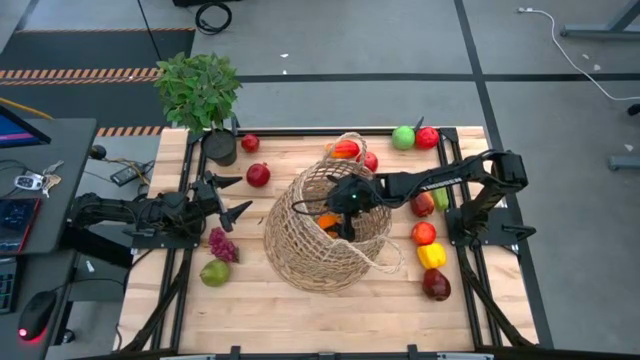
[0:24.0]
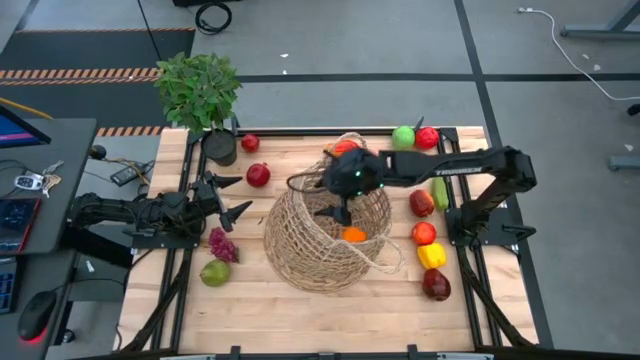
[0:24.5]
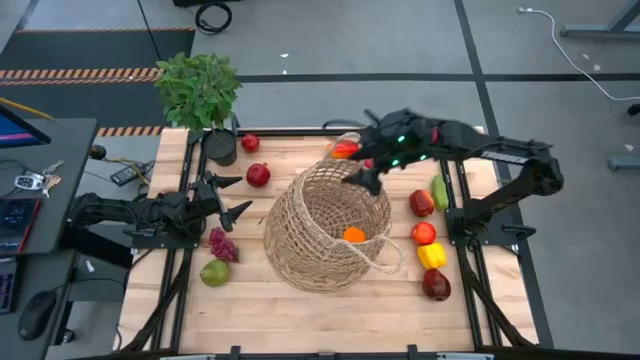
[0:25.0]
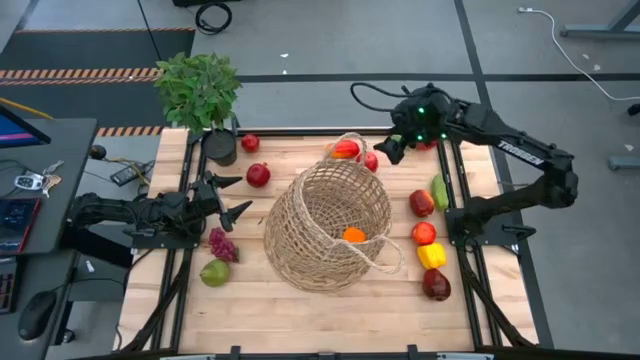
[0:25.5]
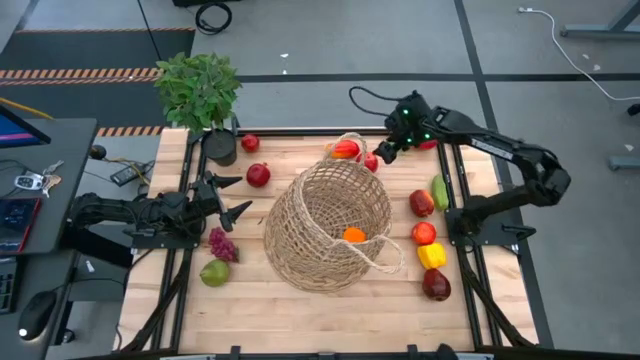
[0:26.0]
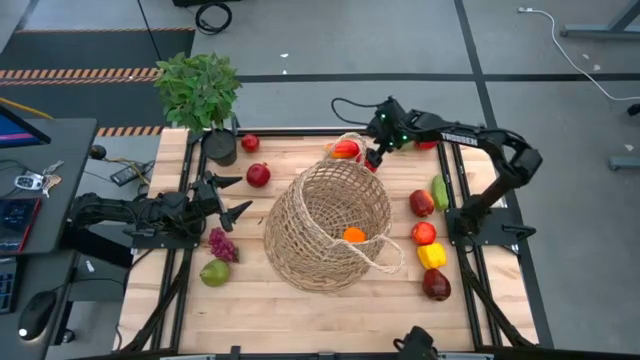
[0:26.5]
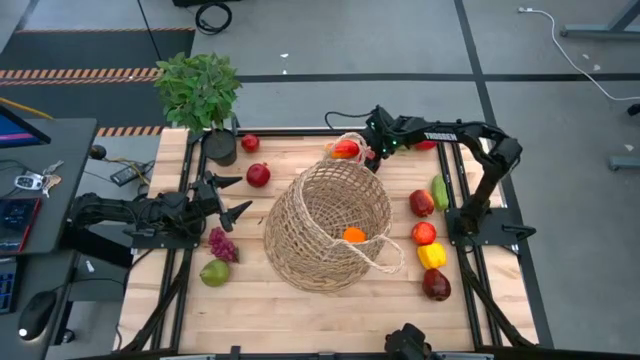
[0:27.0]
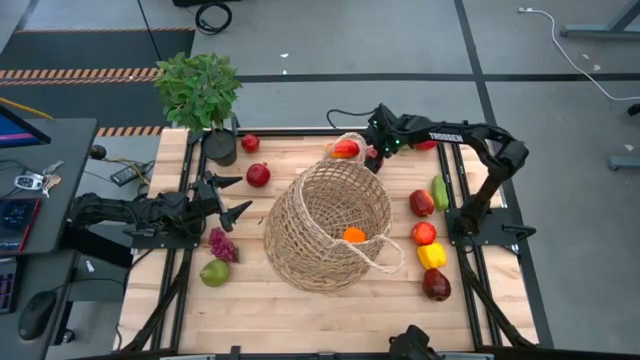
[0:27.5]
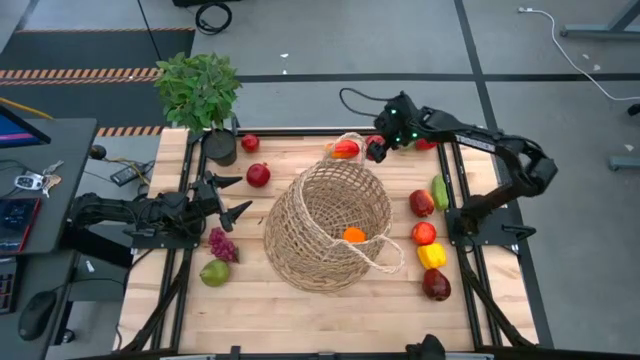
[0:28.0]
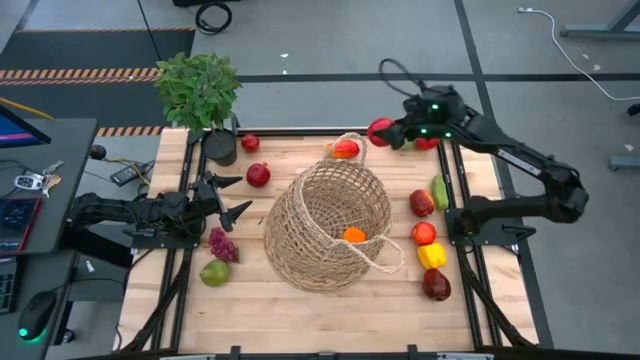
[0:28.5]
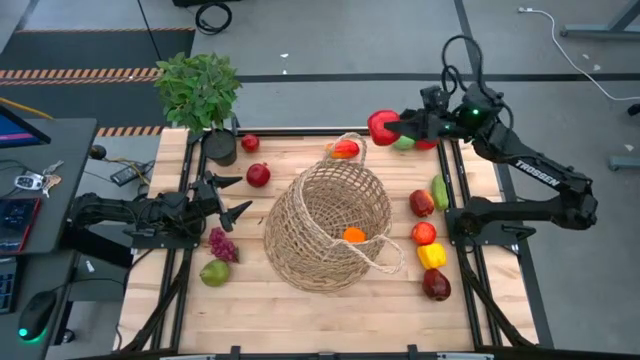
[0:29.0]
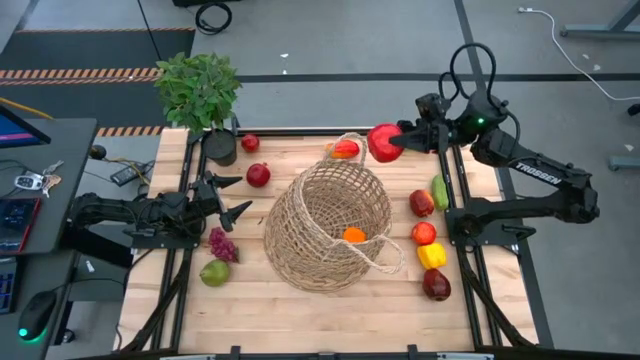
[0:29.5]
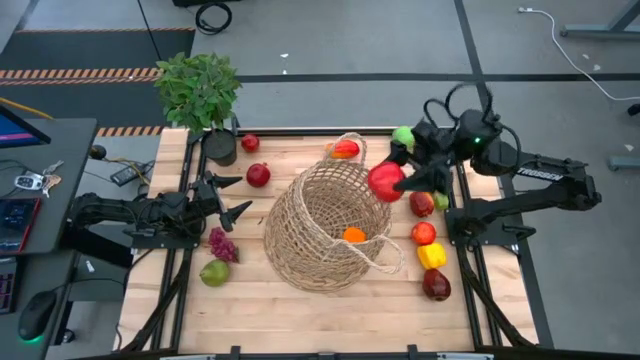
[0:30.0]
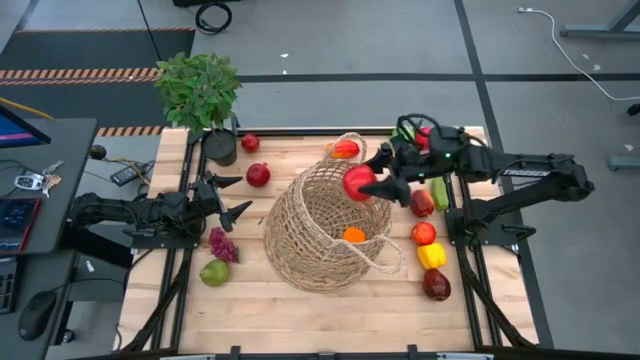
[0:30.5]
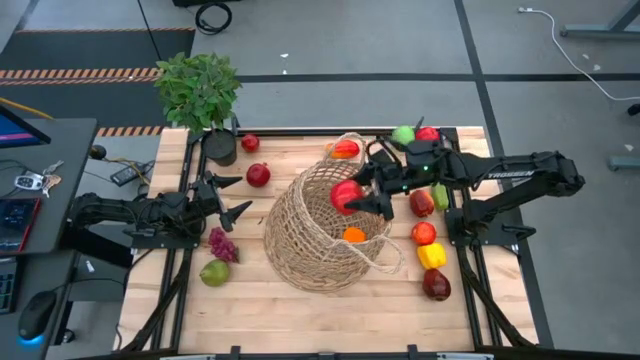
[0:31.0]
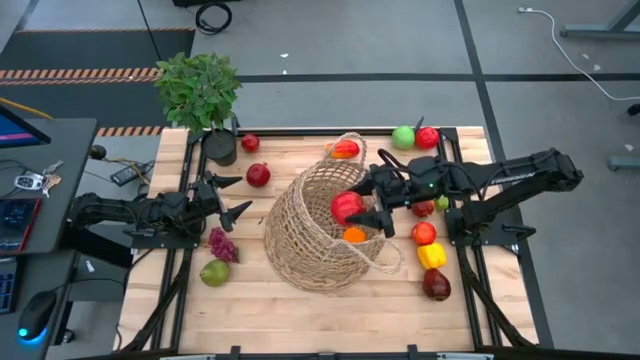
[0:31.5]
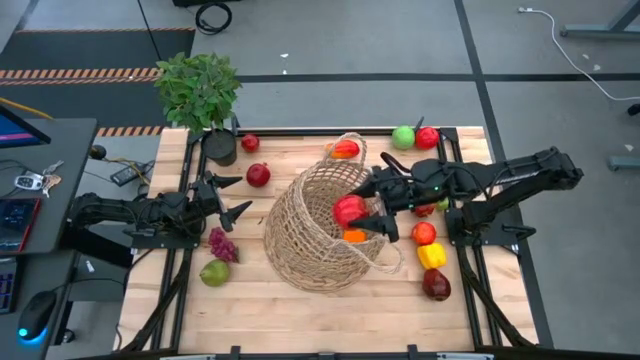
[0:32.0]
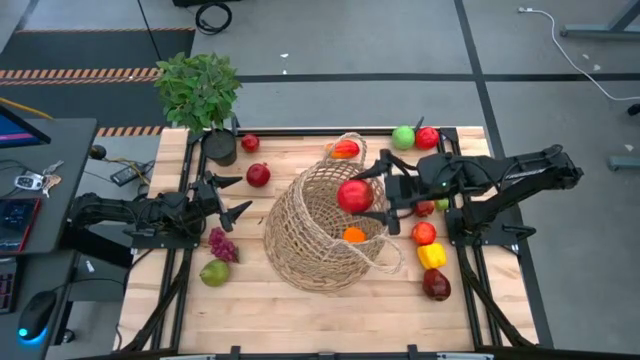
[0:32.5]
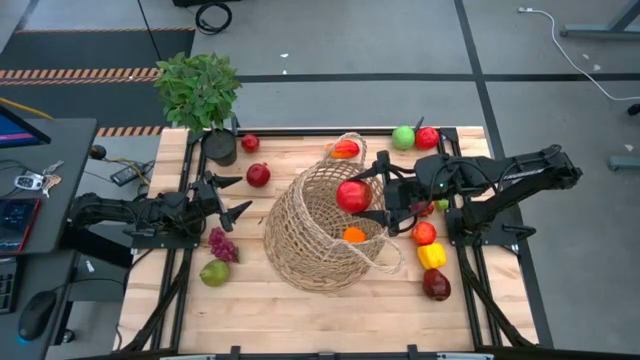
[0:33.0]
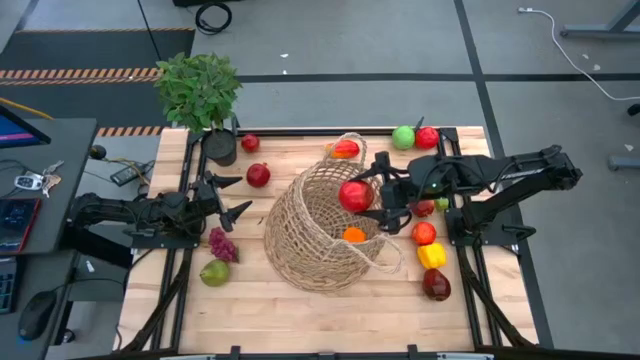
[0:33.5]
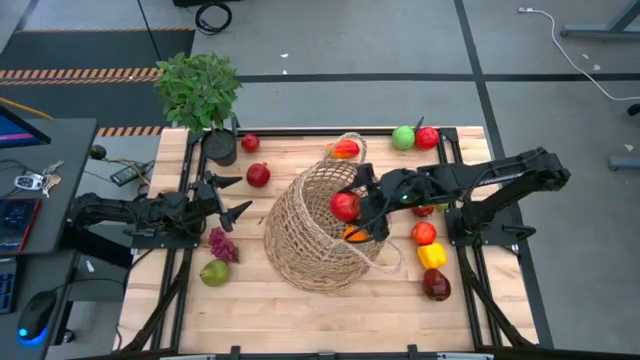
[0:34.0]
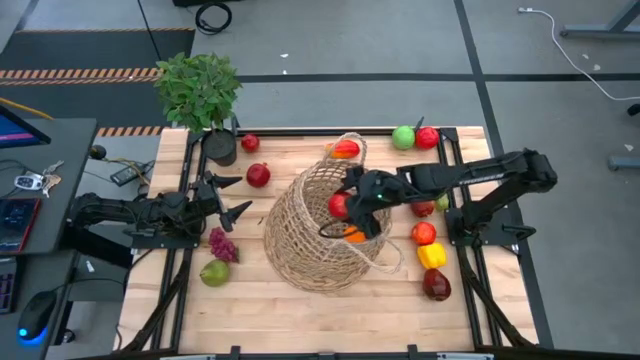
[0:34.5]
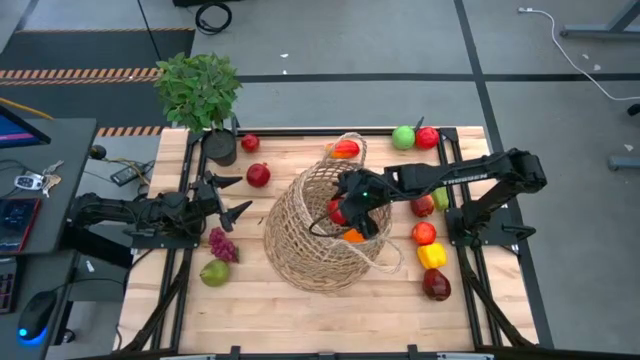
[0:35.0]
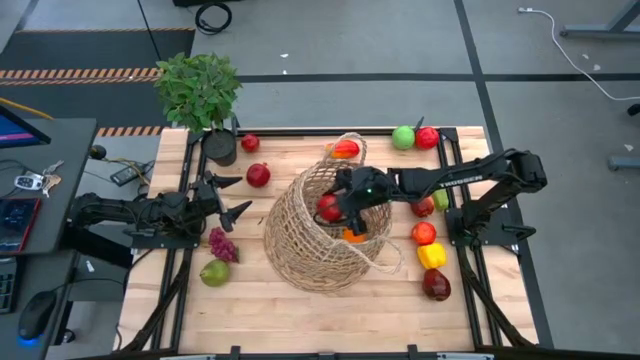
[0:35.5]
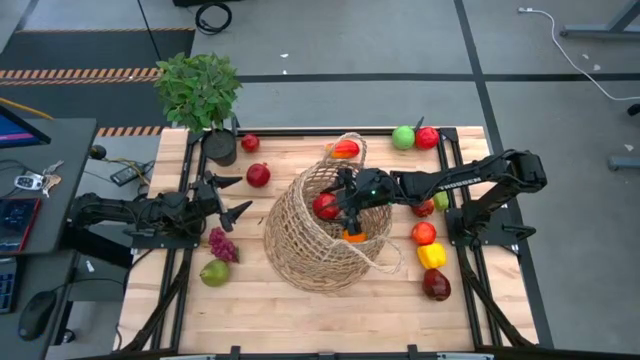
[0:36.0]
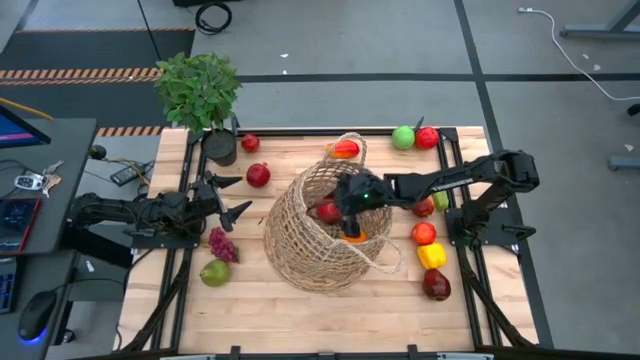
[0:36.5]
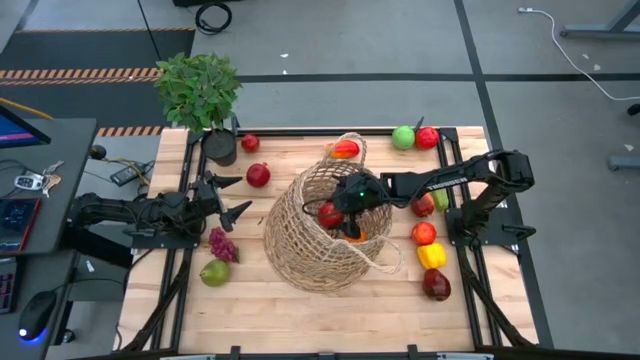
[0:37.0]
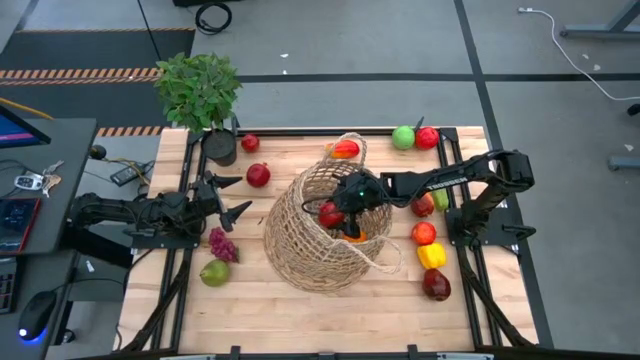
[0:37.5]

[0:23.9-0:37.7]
Task: Build produce basket
Put the red pomegranate into the brown basket

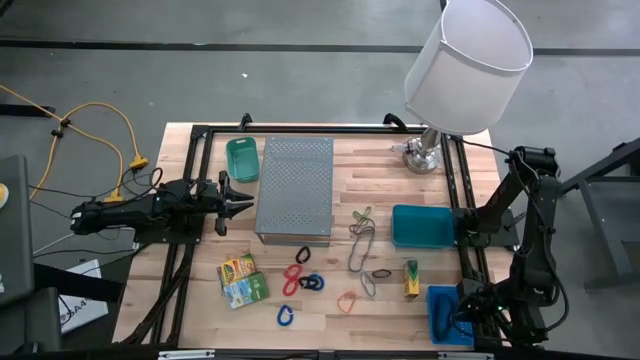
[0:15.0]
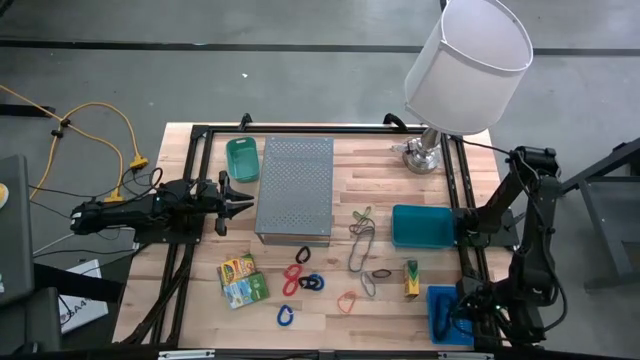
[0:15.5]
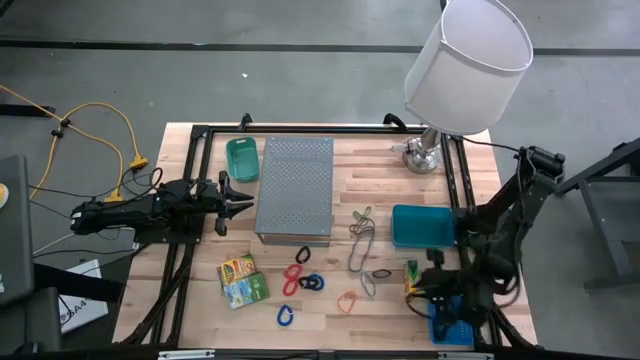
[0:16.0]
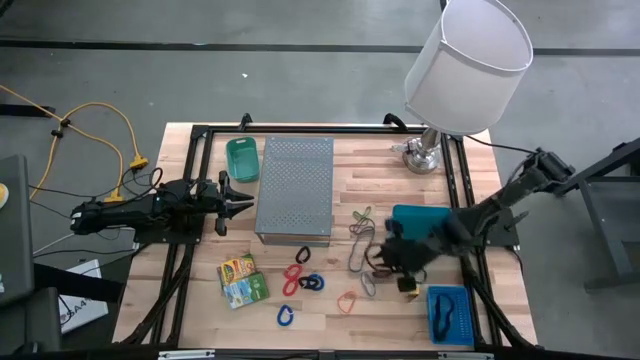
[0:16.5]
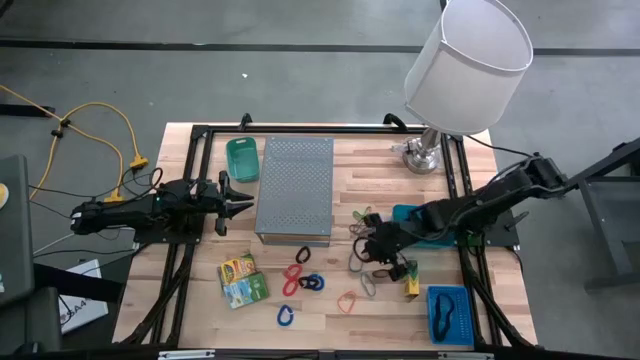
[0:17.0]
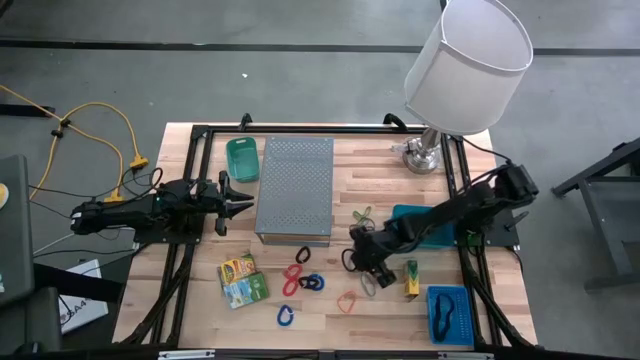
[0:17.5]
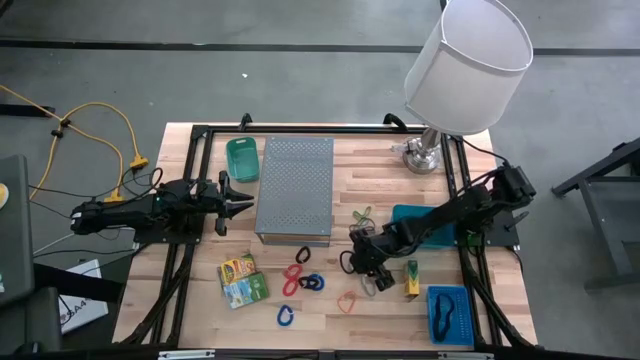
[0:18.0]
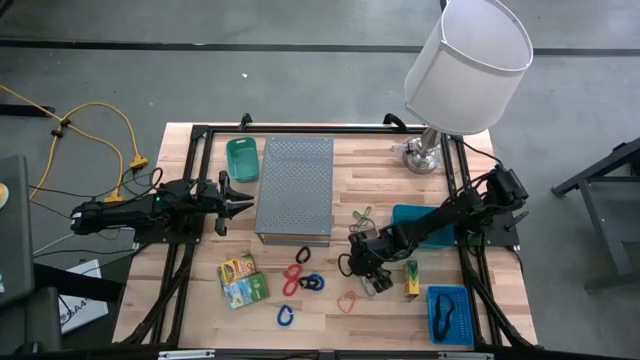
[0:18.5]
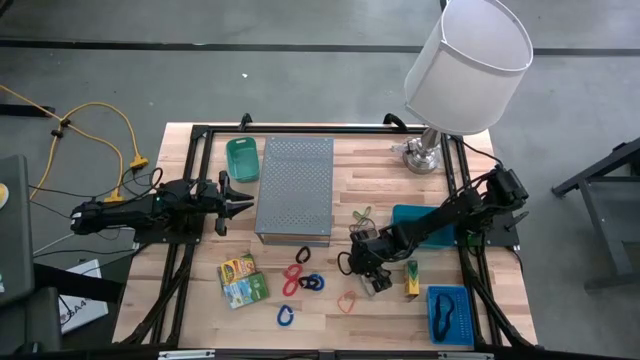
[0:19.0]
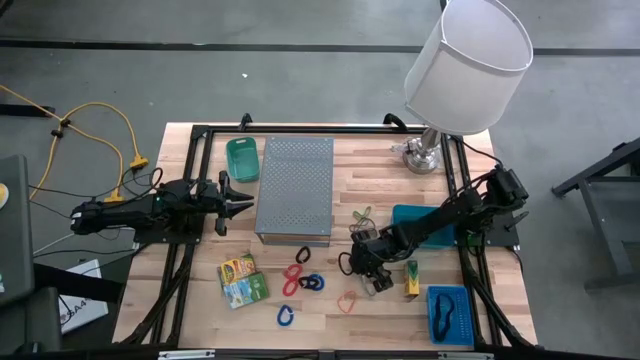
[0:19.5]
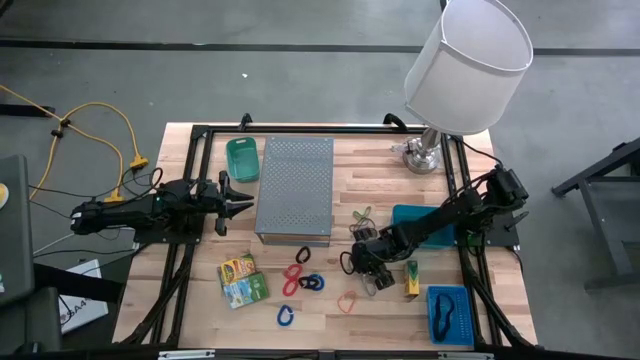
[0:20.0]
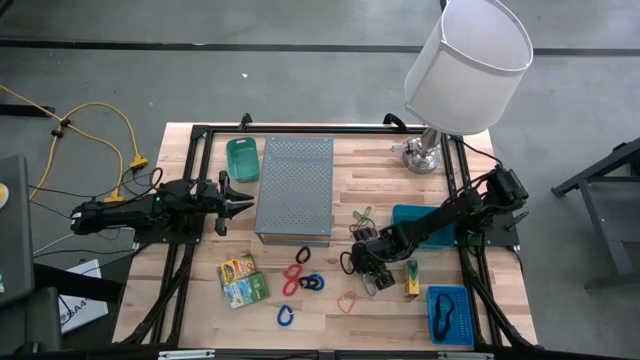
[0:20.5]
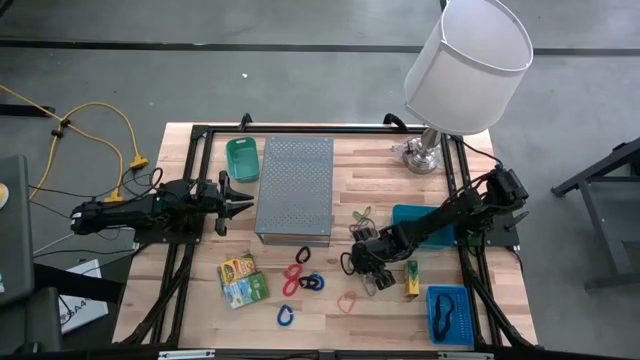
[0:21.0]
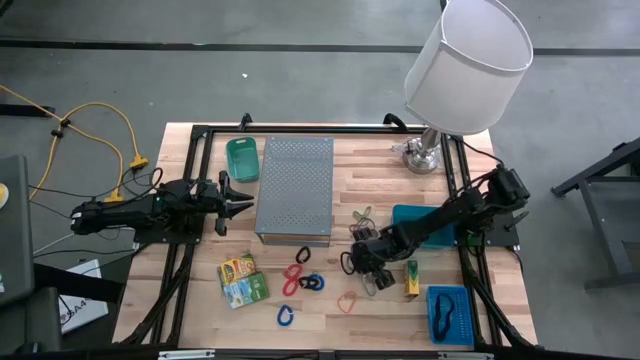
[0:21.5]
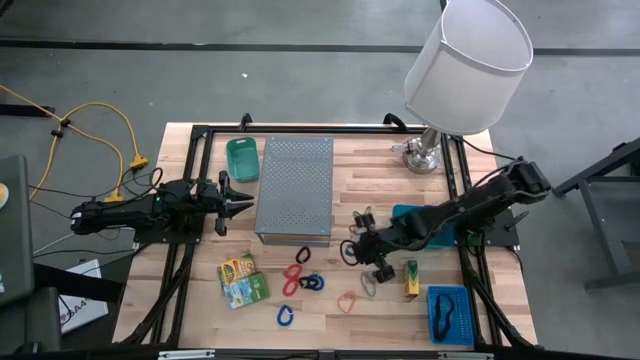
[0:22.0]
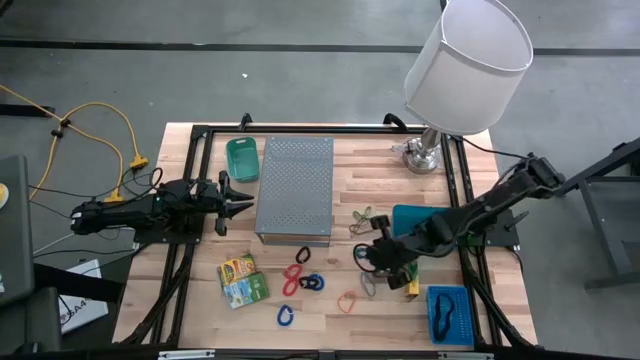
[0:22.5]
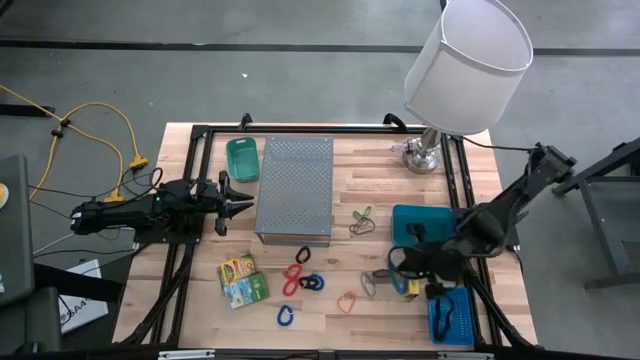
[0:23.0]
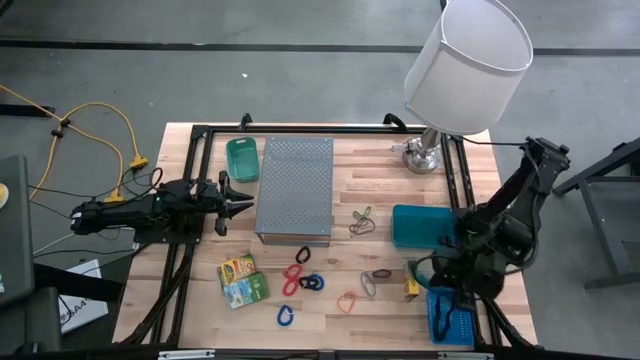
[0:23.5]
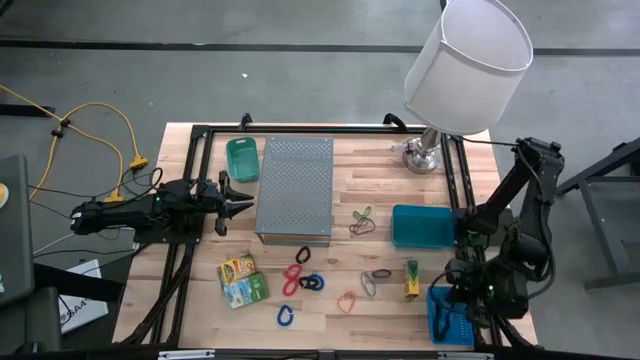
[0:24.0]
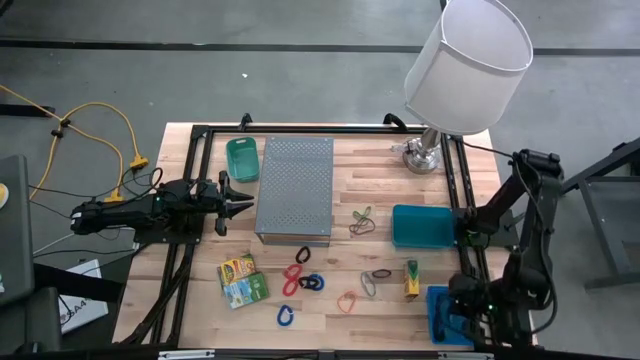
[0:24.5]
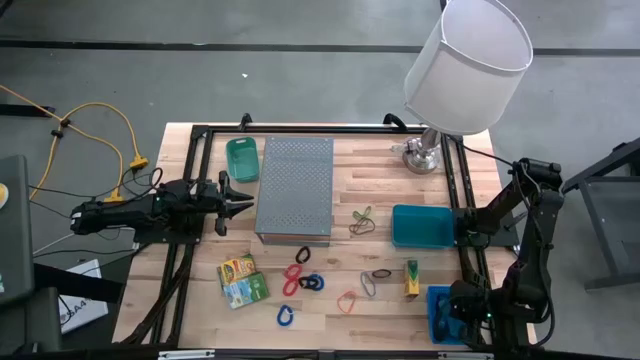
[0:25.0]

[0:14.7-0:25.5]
Task: Pick & Place Office Desk Supplies
Put the top blue rubberband into the blue basket
